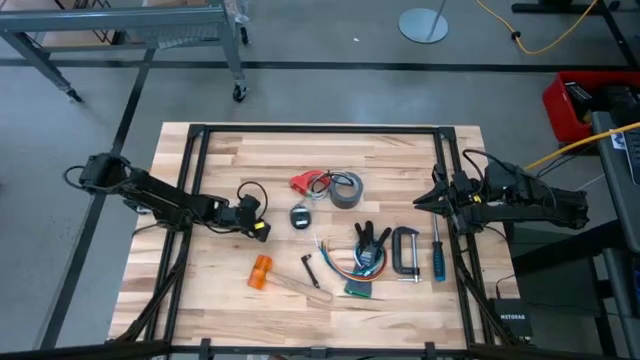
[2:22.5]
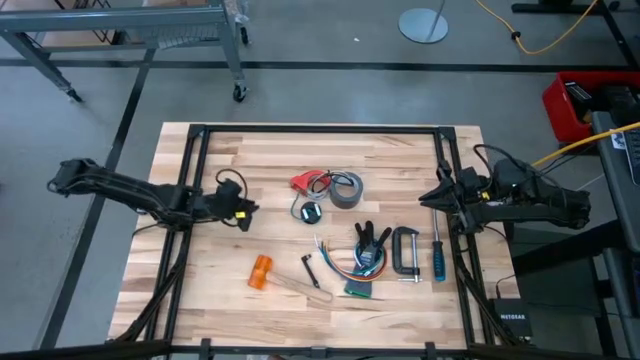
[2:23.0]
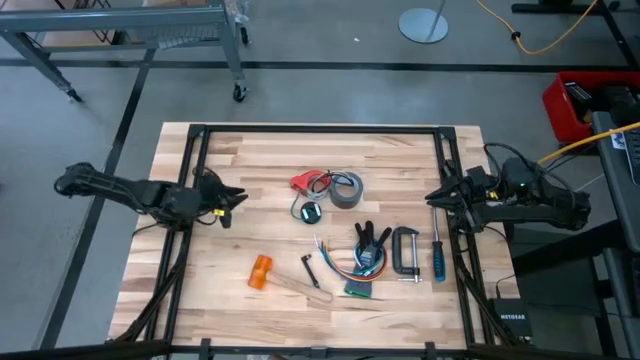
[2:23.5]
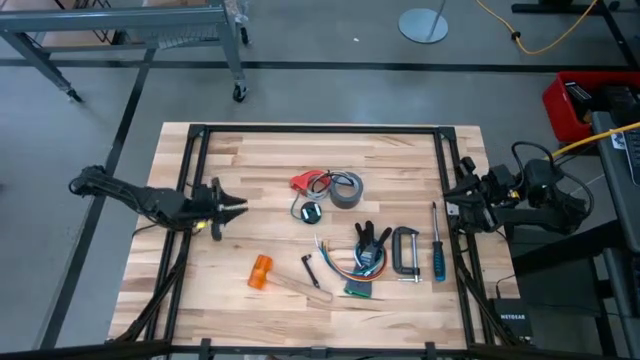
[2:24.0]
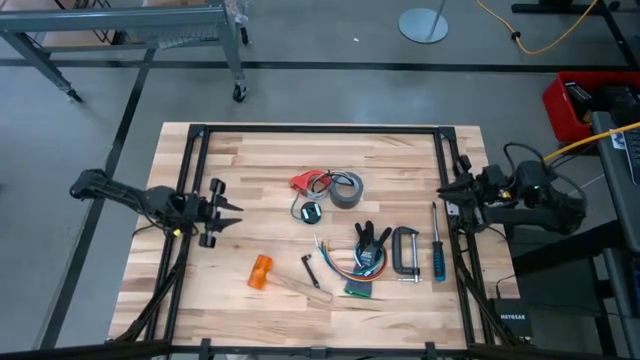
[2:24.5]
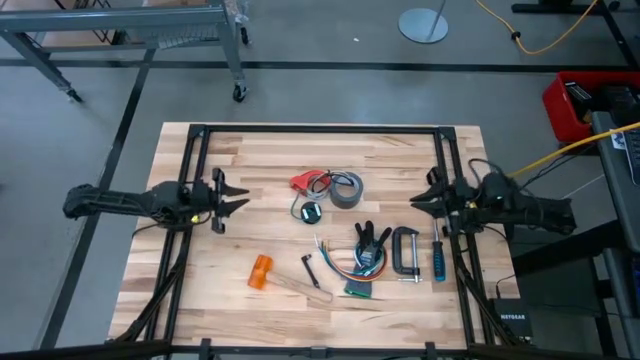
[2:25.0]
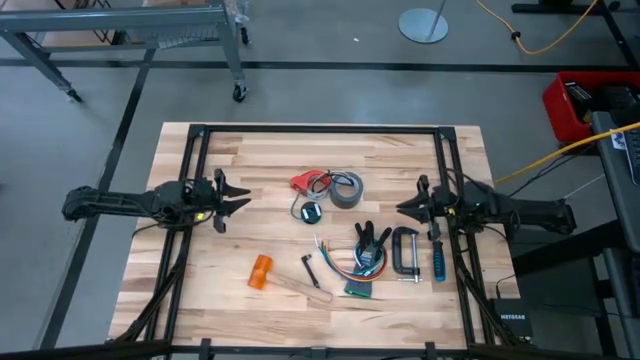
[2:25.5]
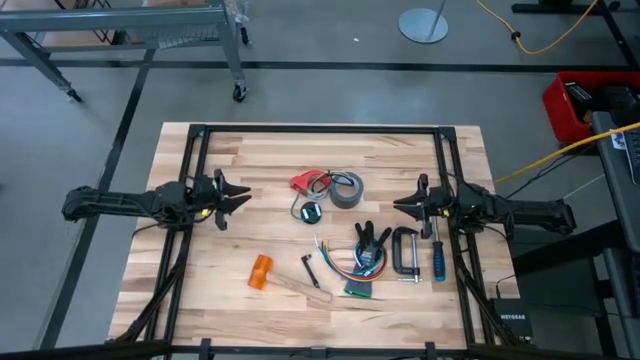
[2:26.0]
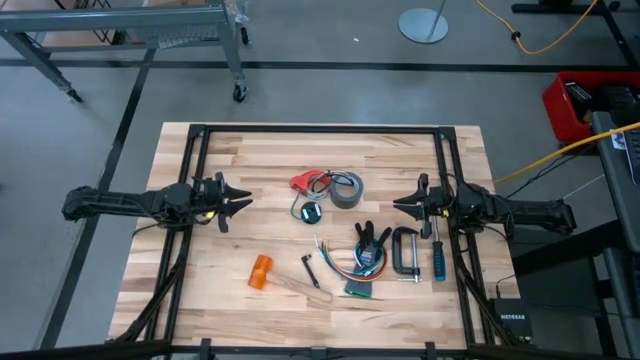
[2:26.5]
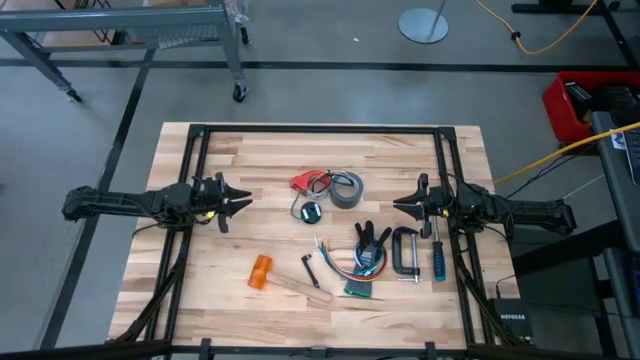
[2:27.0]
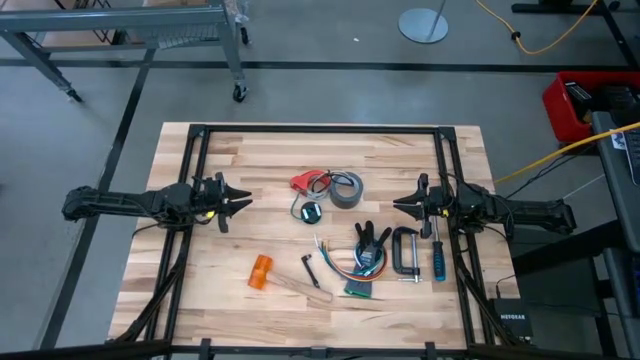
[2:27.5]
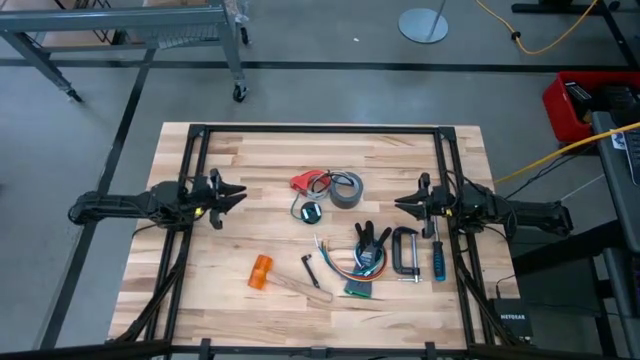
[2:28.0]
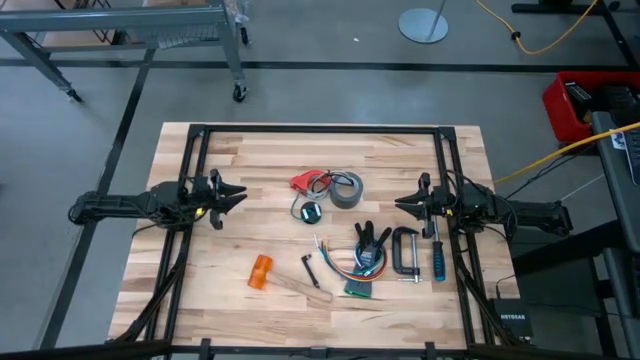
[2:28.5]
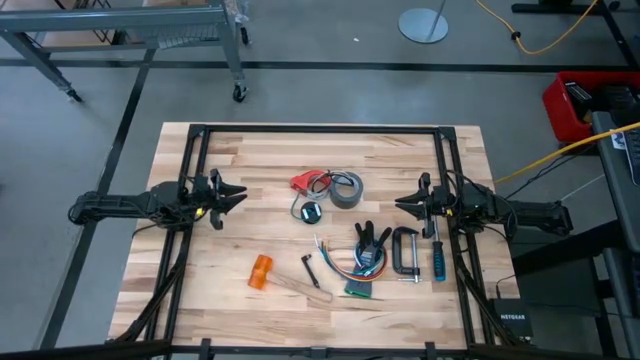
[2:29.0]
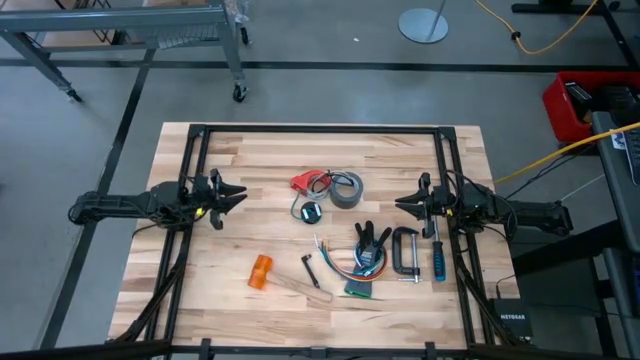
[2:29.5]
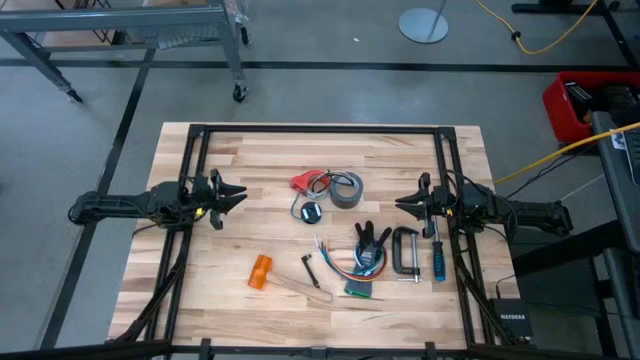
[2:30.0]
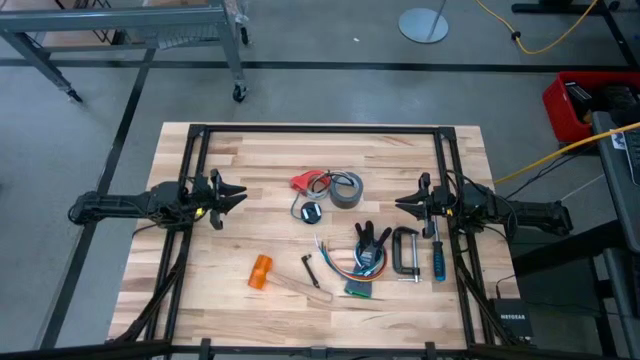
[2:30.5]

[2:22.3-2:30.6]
Task: Coil cords
Return to Home Position

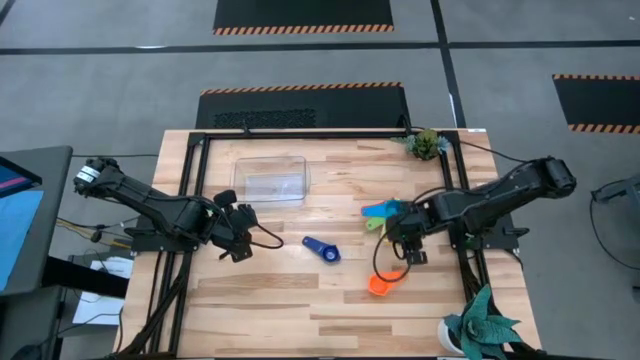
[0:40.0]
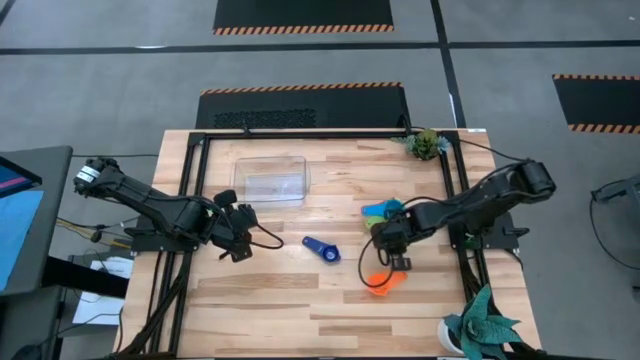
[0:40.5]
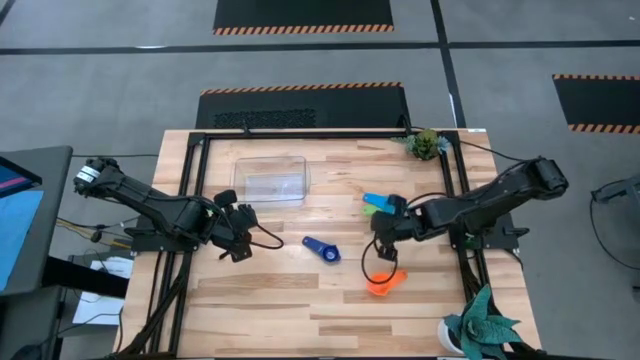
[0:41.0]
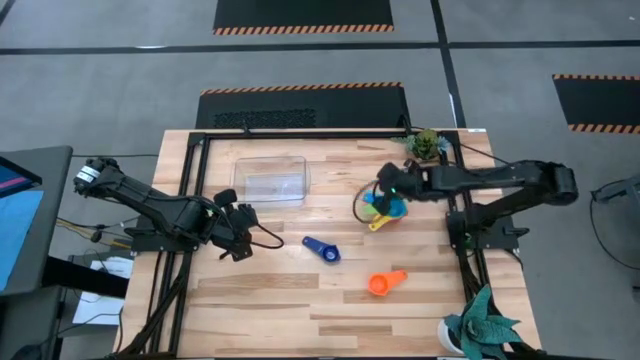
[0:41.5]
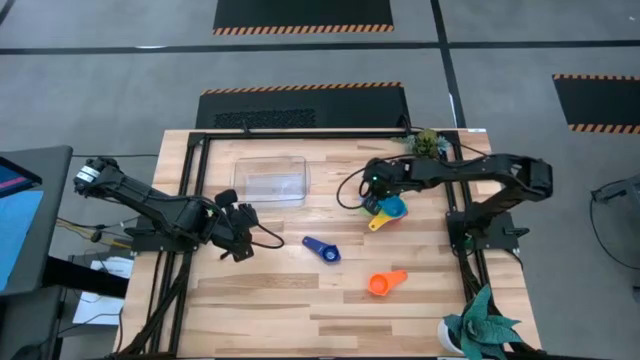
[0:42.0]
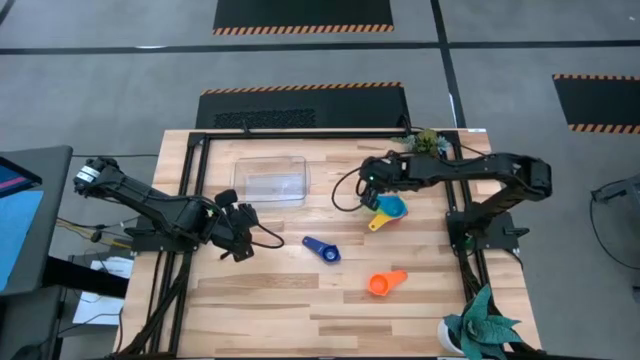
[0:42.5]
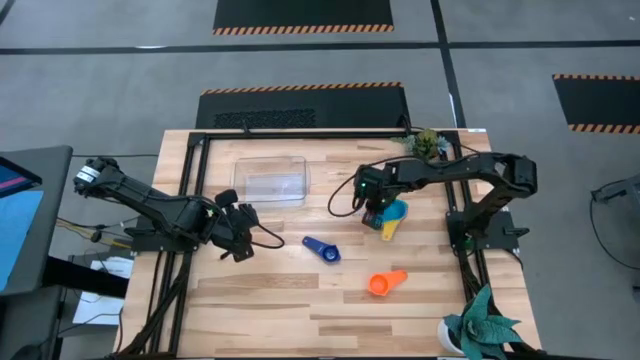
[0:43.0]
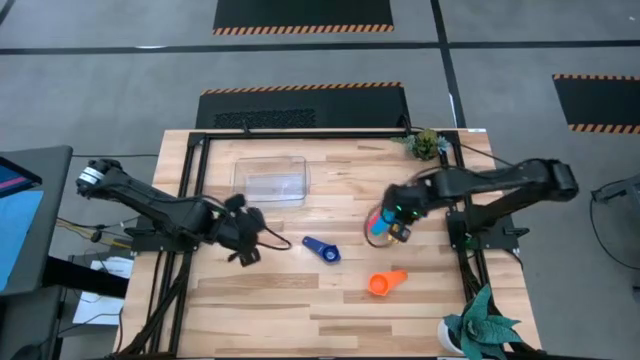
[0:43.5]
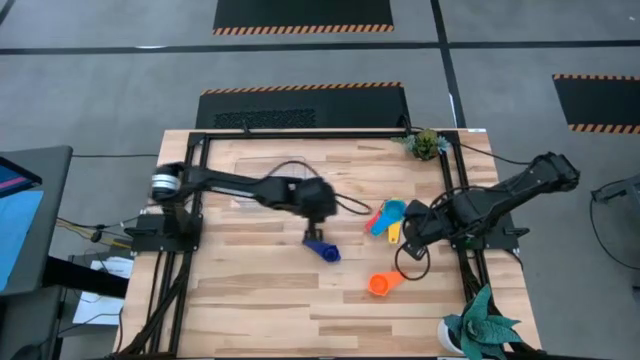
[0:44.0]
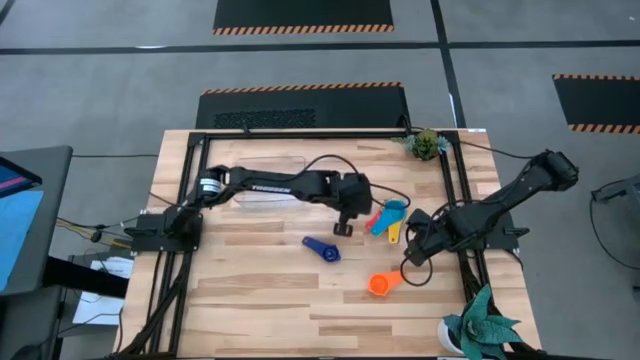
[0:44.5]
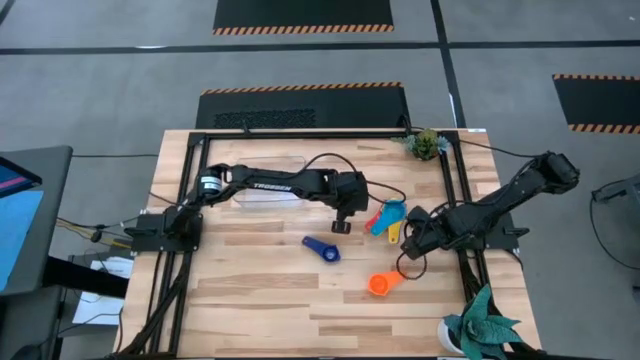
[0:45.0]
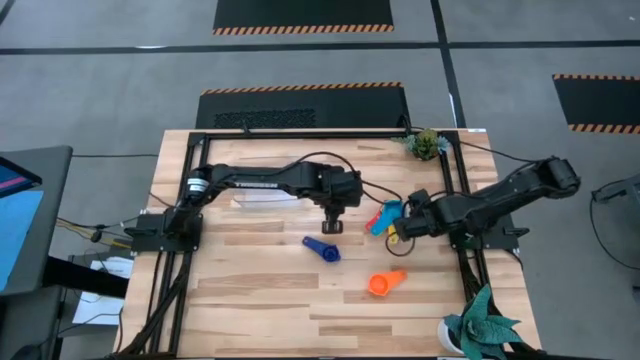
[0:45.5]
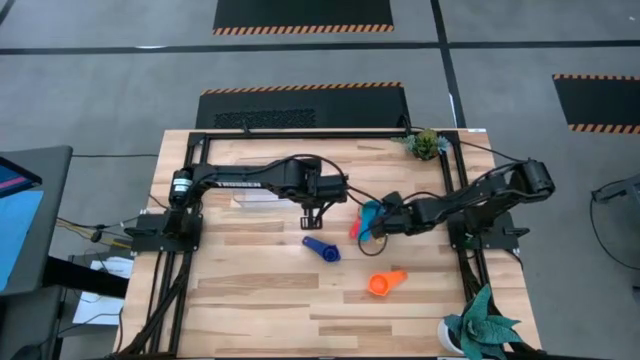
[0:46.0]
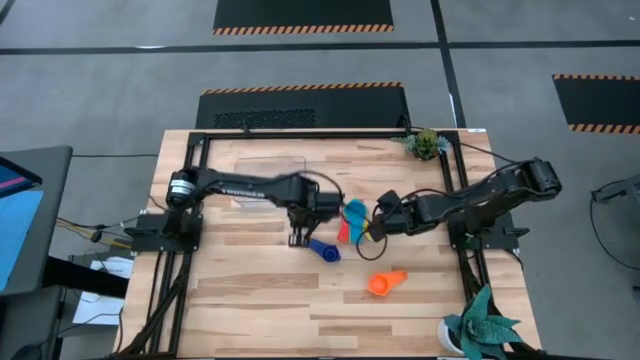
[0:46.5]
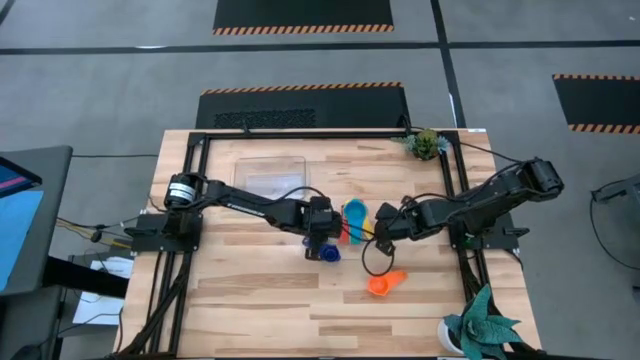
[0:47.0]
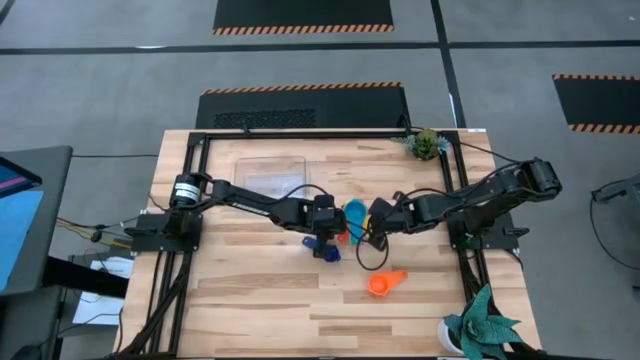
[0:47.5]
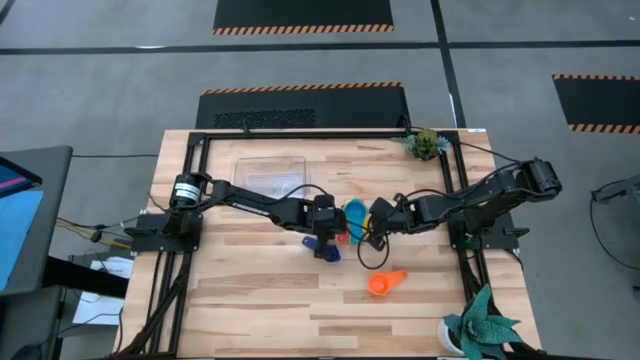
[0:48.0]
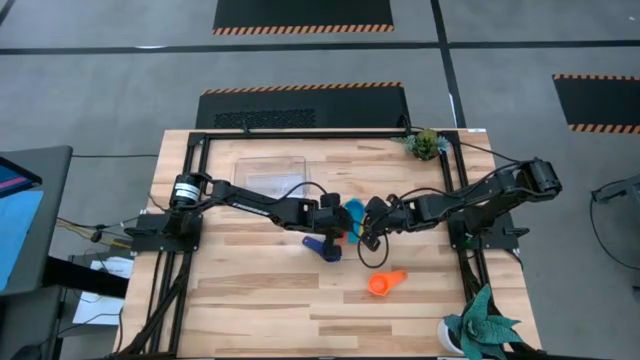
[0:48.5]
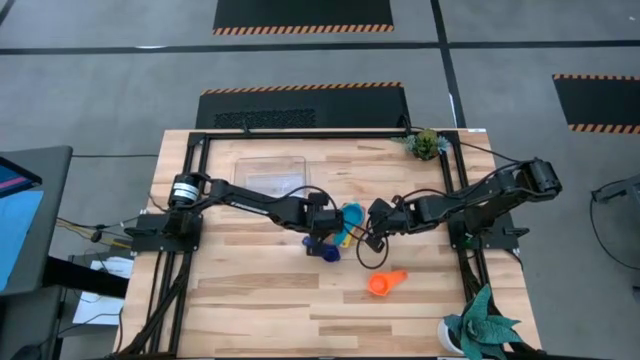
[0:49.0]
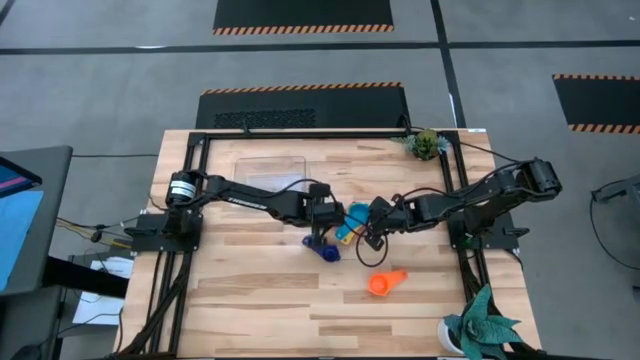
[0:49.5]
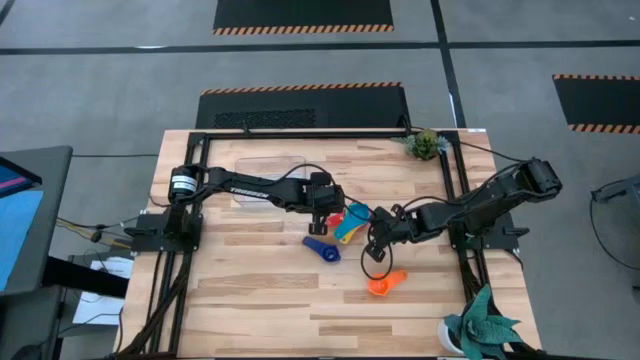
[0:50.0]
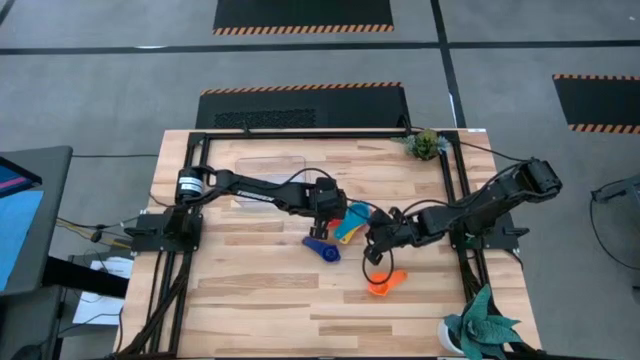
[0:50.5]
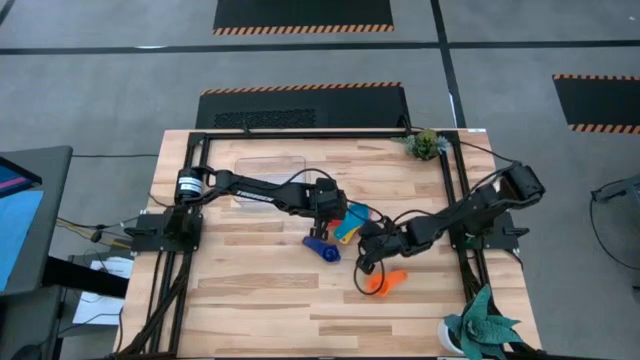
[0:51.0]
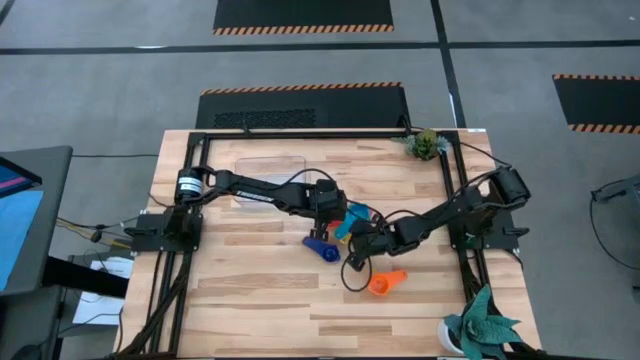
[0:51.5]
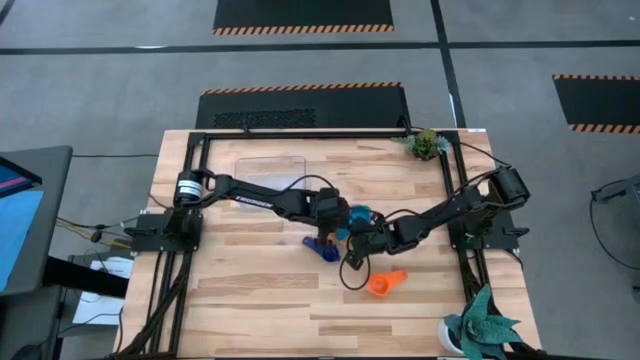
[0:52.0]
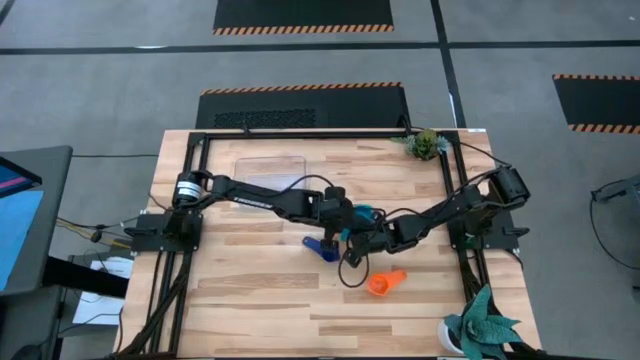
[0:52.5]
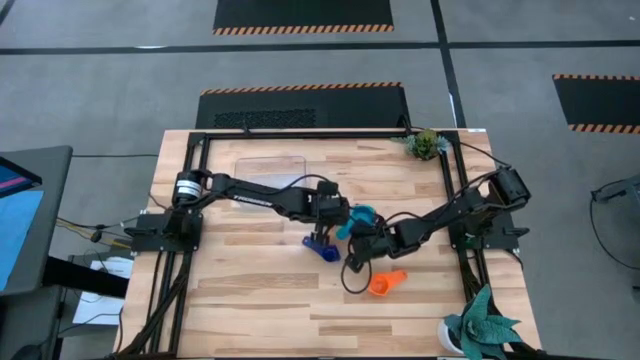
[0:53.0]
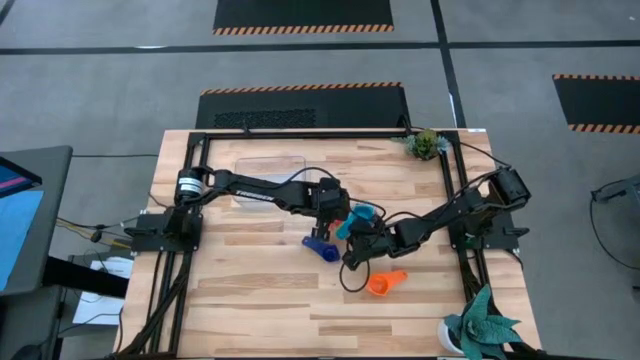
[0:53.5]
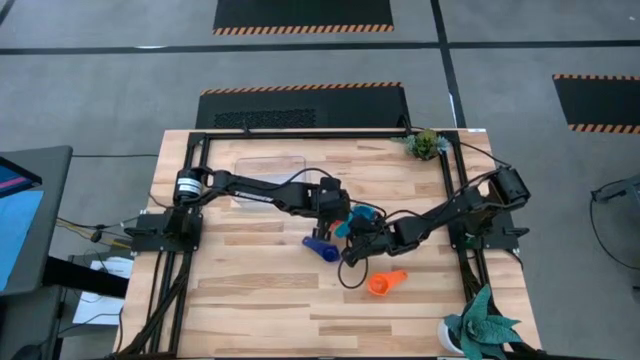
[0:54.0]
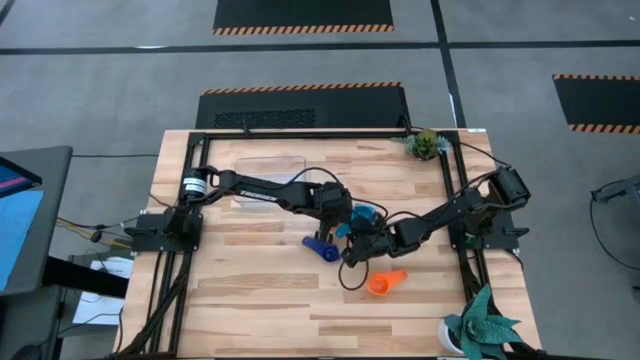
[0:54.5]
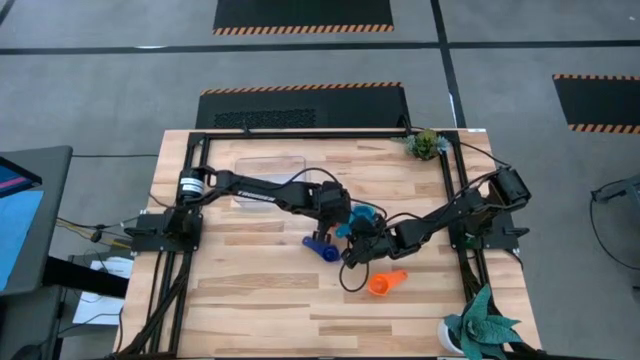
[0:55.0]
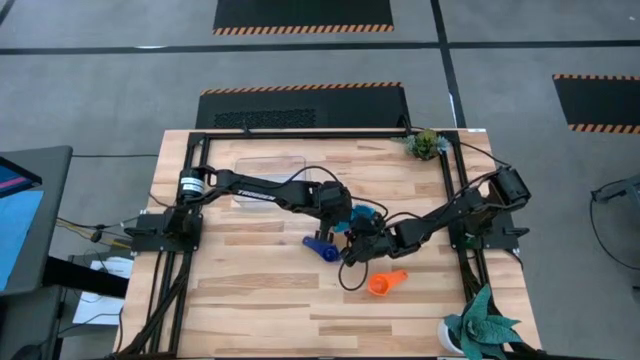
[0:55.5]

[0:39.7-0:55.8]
Task: Nest measuring cups in basket
Adjust the stacked measuring cups on the table
